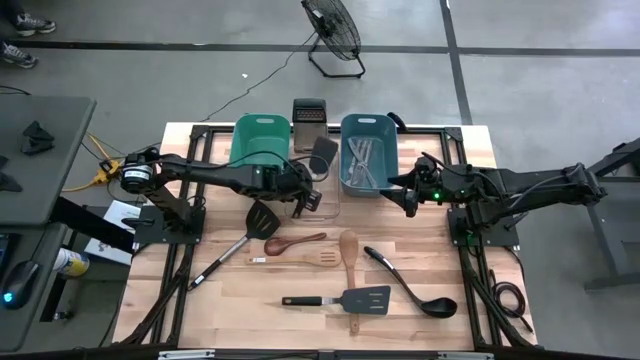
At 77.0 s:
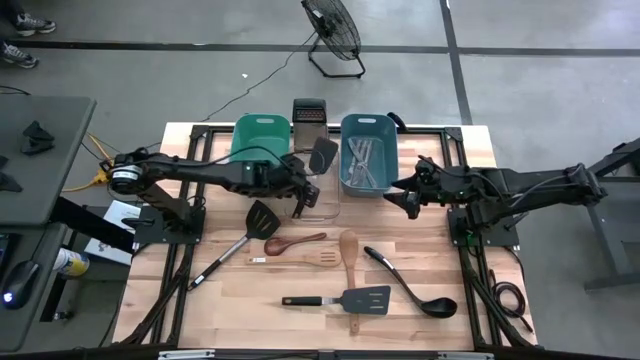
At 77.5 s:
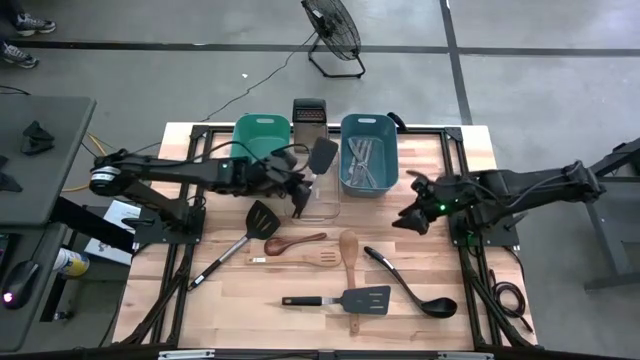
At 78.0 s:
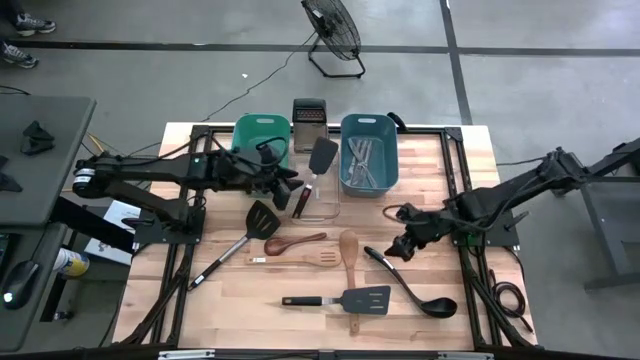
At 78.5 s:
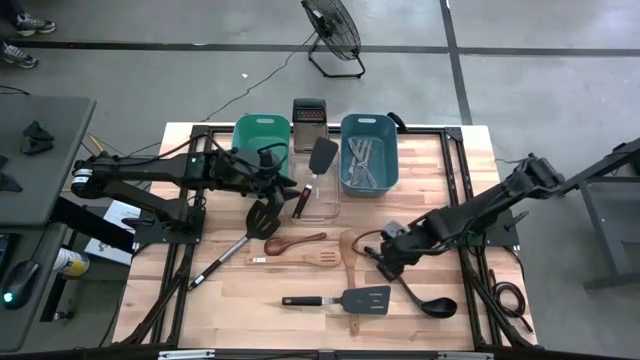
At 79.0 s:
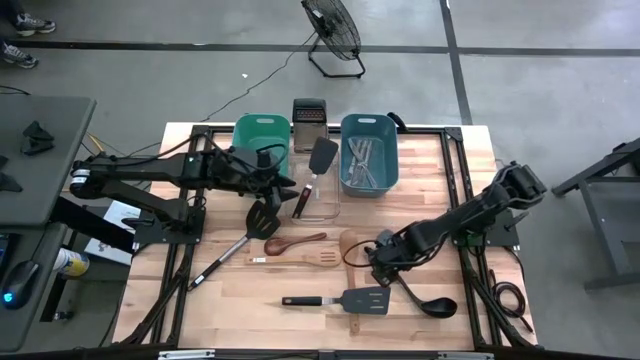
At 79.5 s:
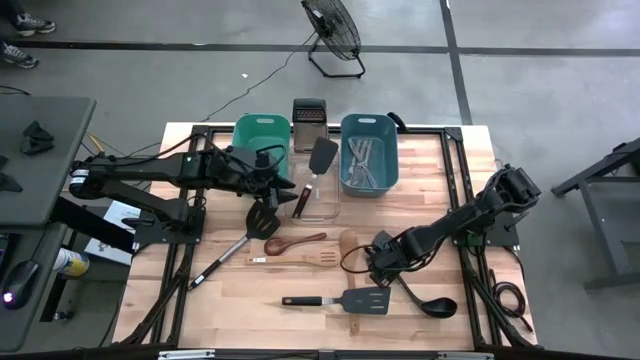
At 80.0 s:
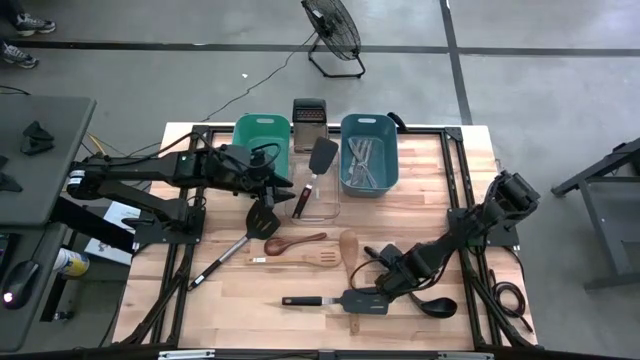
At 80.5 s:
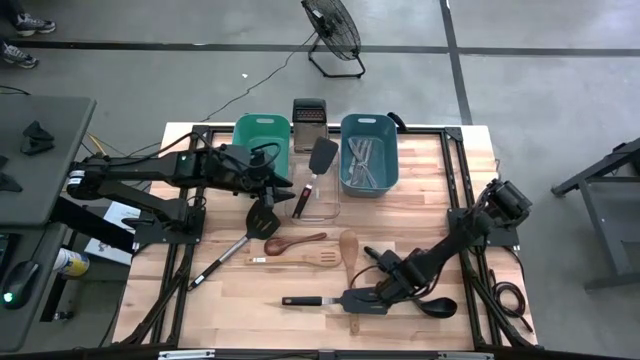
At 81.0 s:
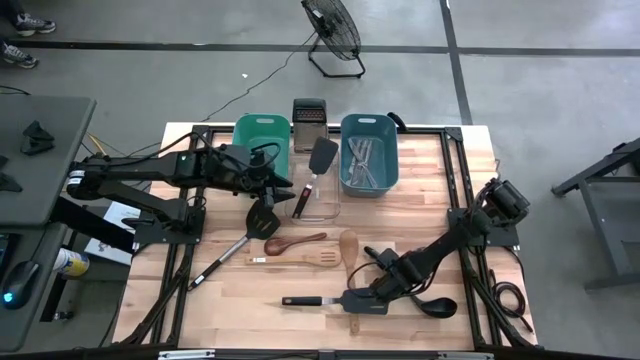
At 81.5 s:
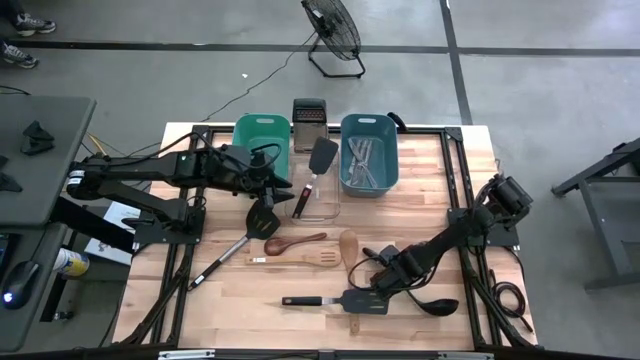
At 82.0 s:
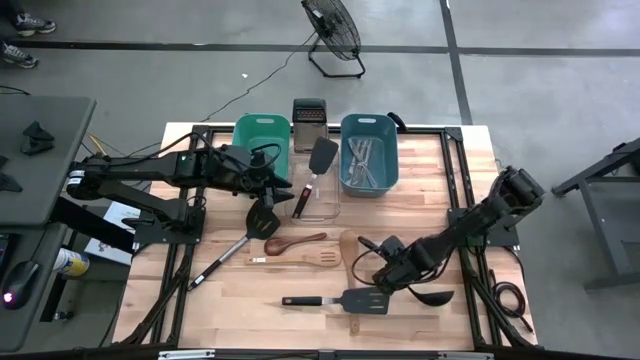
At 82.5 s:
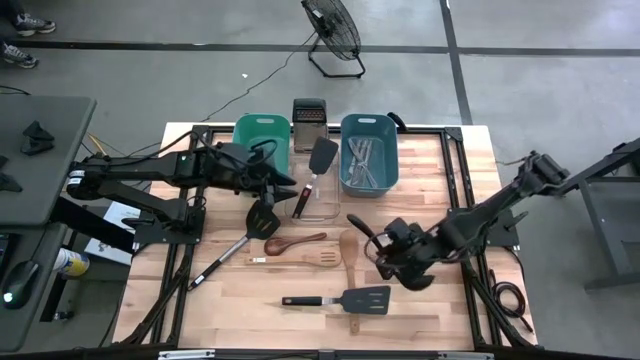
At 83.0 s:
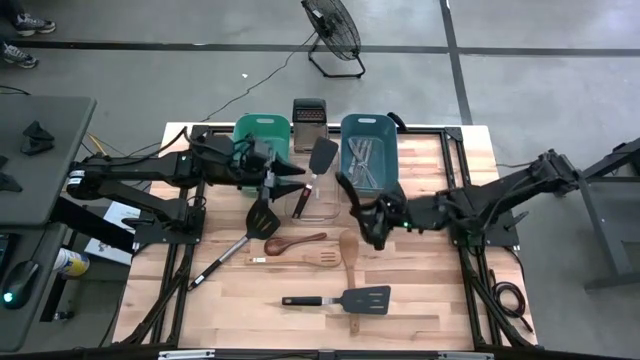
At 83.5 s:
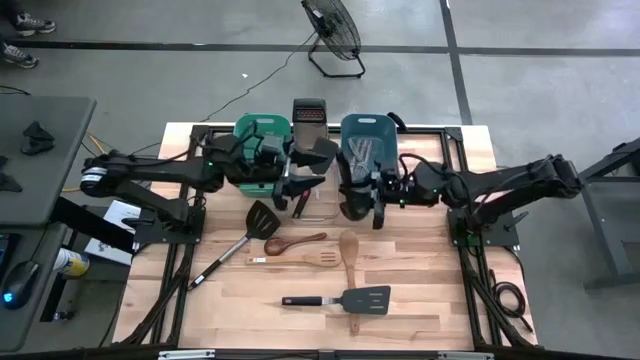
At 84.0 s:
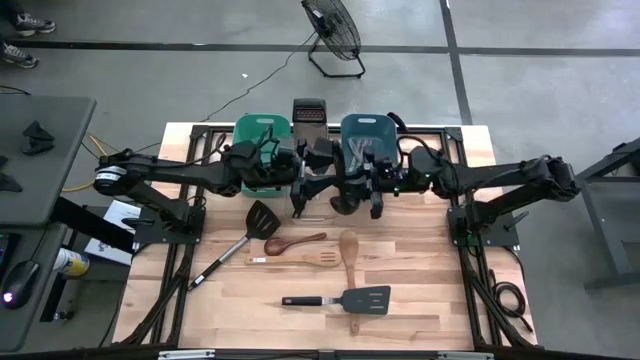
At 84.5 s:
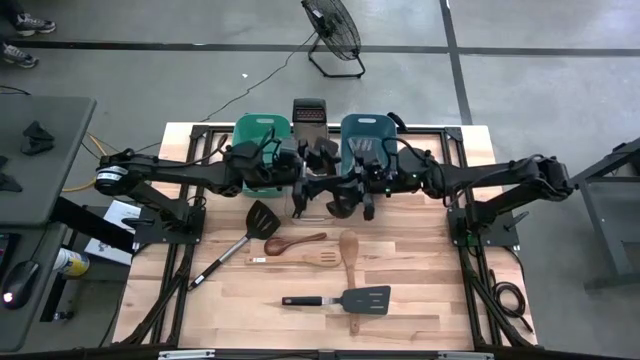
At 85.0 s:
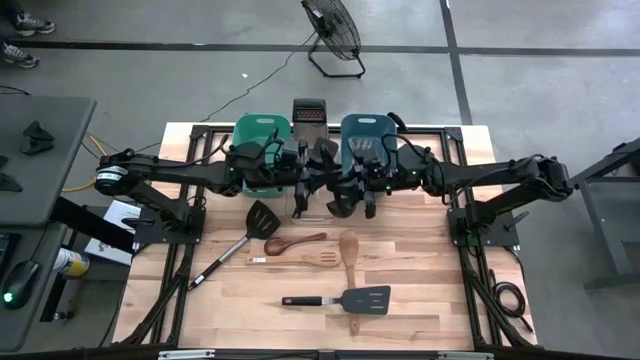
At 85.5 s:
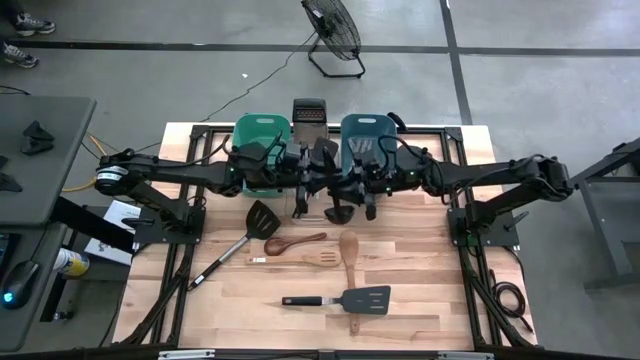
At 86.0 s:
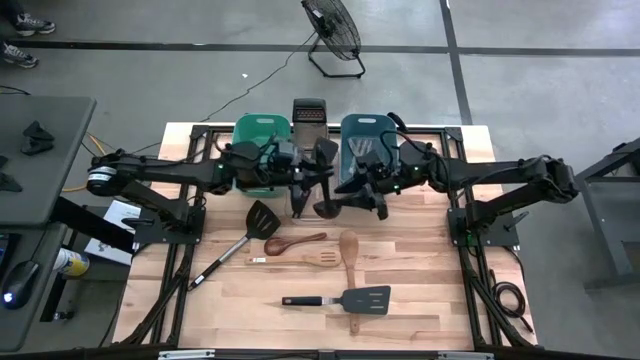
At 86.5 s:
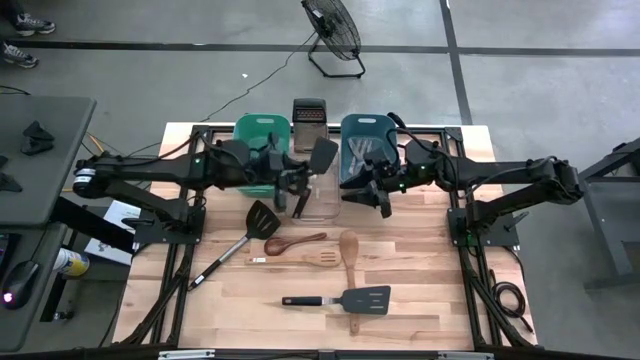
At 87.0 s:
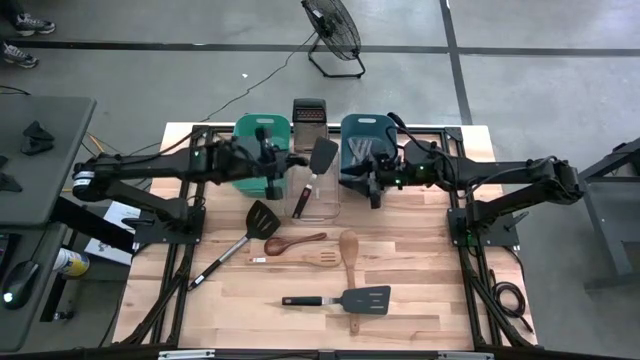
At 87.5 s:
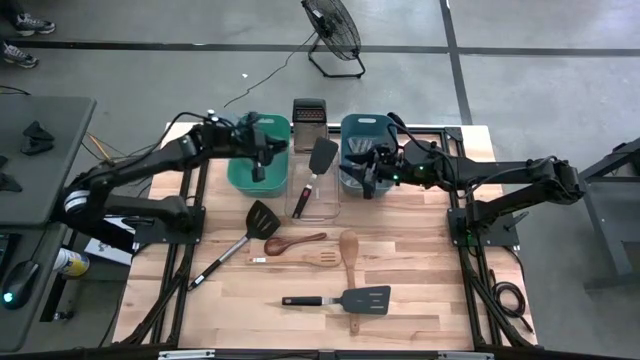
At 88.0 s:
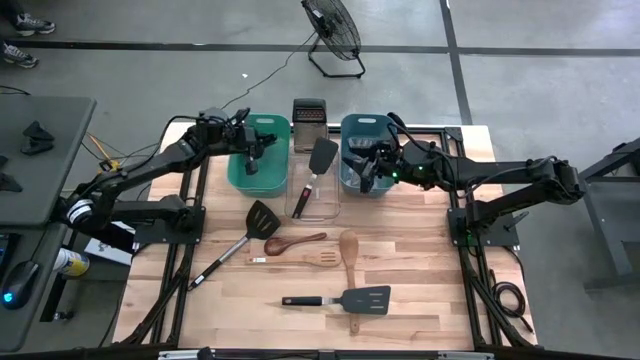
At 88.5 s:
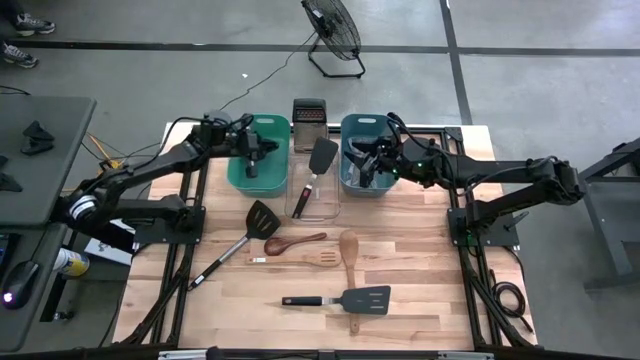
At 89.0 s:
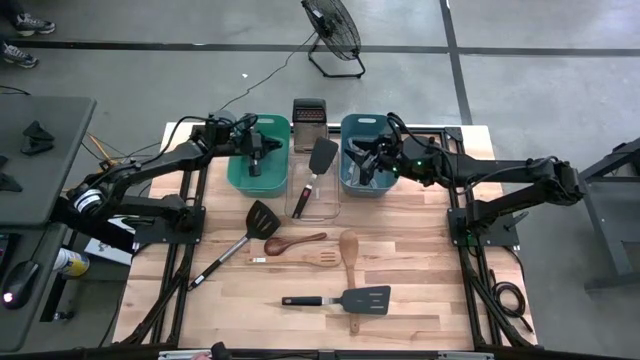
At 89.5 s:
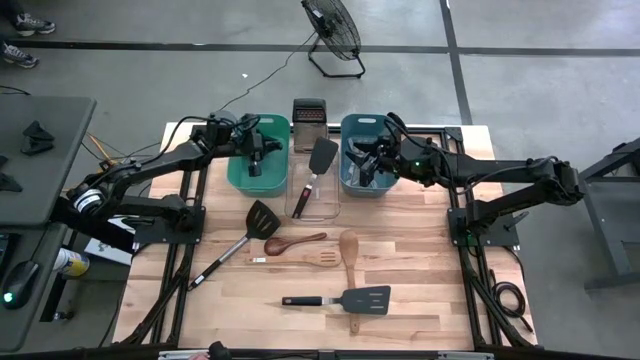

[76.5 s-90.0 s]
Task: Pick & Place Kitchen Items
Put the black serving spoon into the green bin

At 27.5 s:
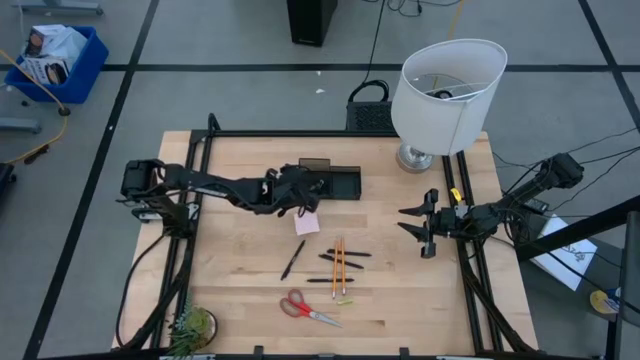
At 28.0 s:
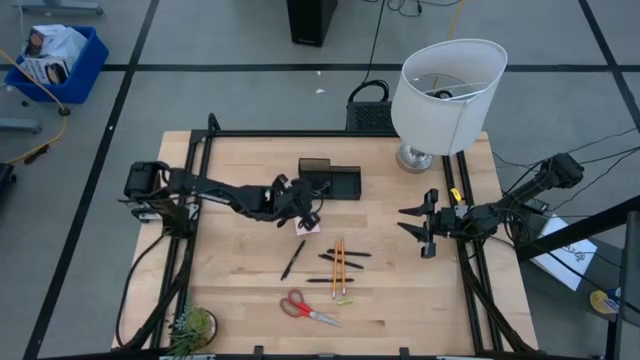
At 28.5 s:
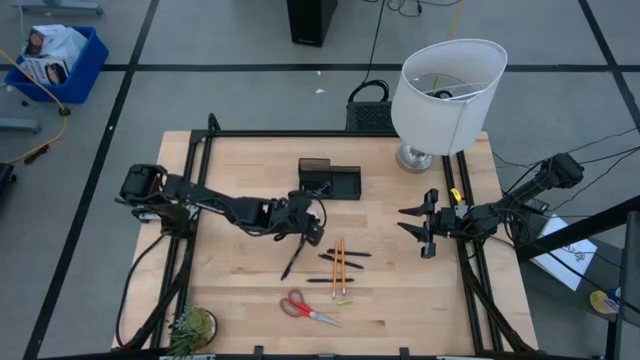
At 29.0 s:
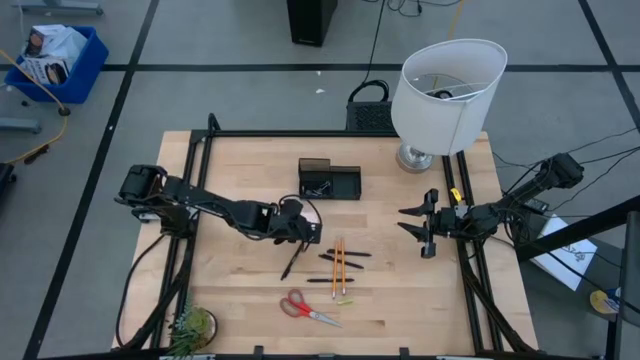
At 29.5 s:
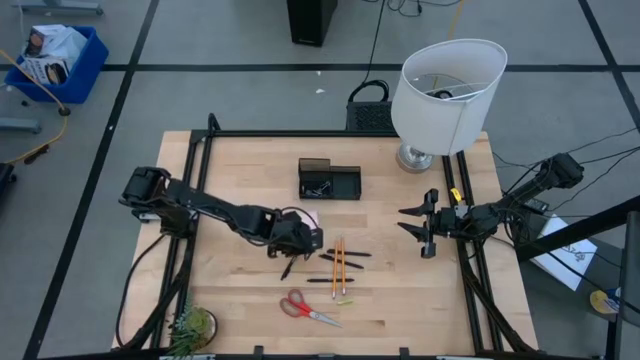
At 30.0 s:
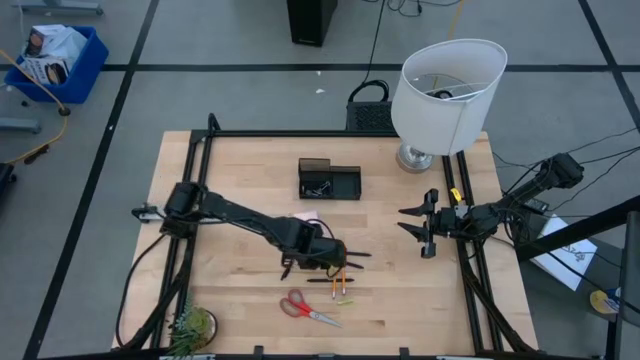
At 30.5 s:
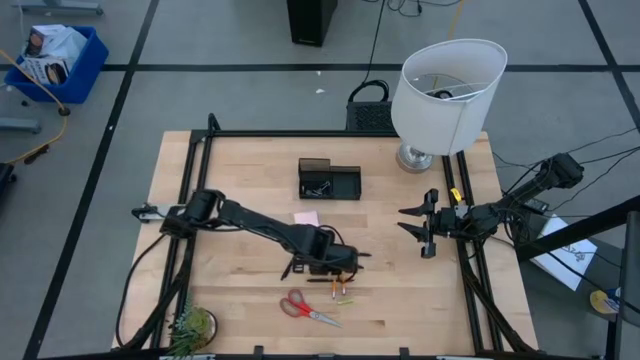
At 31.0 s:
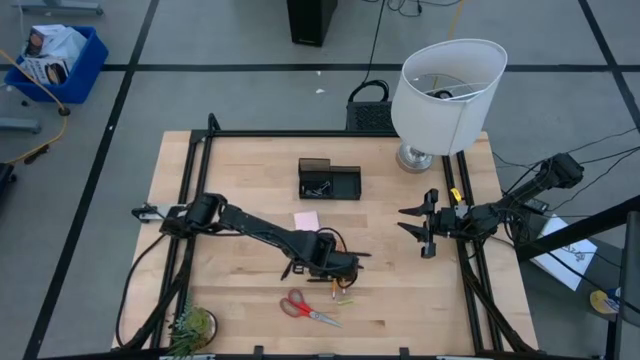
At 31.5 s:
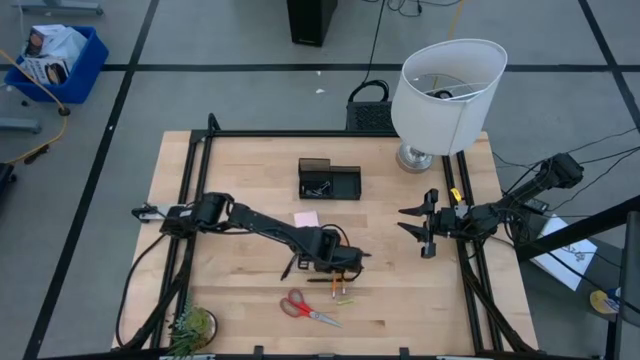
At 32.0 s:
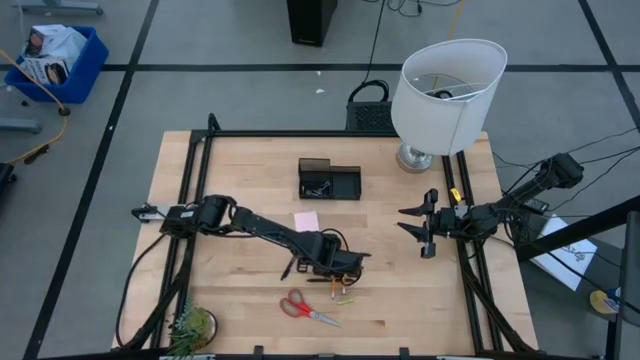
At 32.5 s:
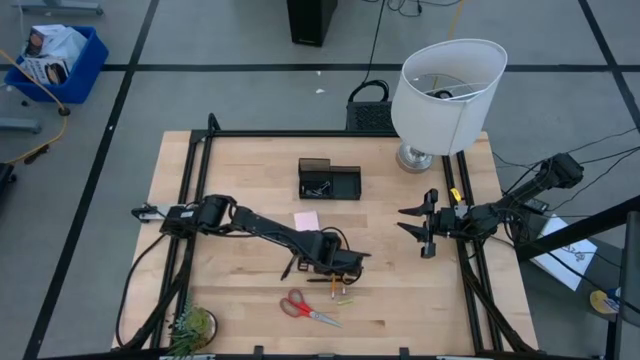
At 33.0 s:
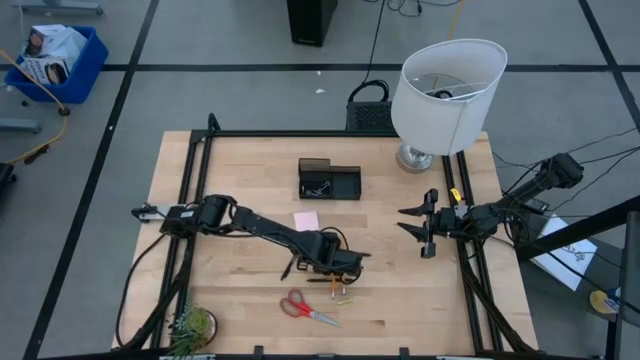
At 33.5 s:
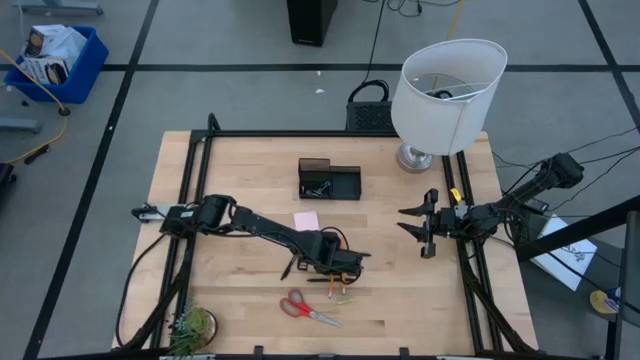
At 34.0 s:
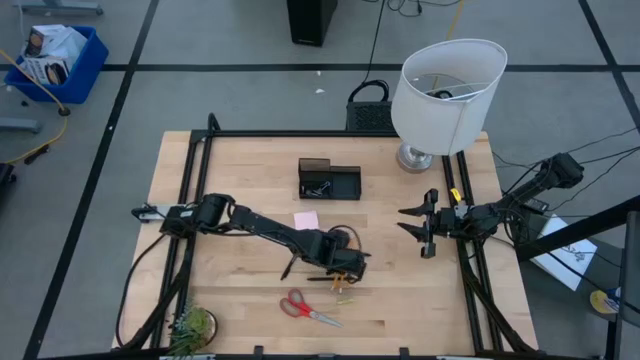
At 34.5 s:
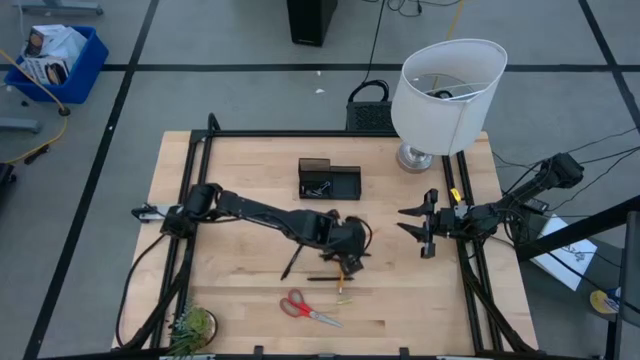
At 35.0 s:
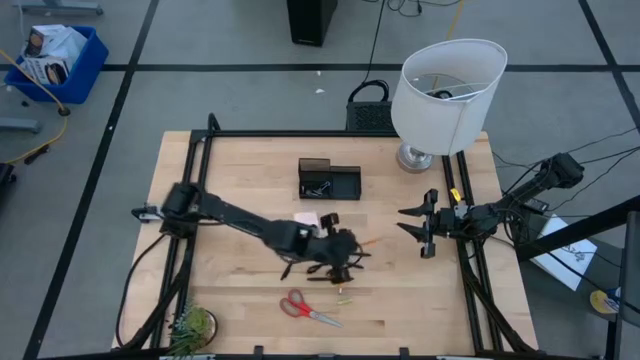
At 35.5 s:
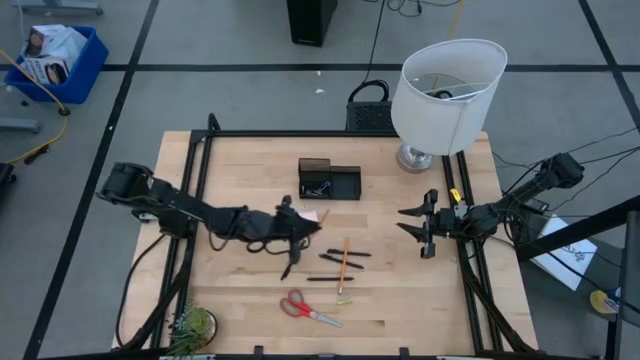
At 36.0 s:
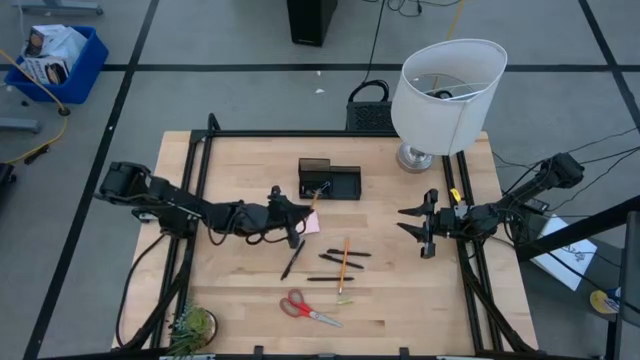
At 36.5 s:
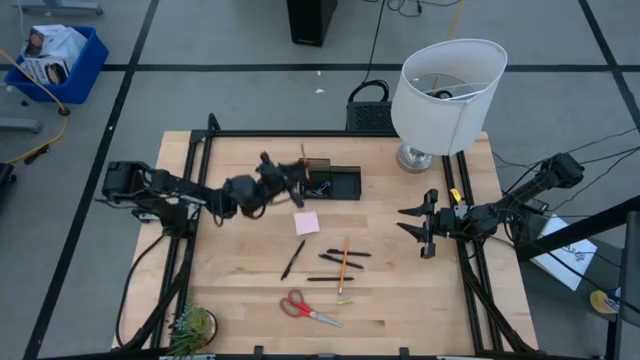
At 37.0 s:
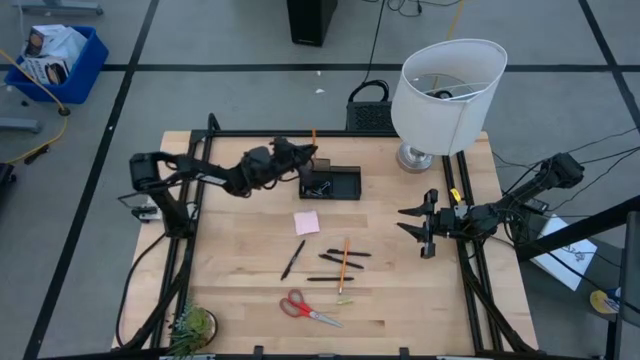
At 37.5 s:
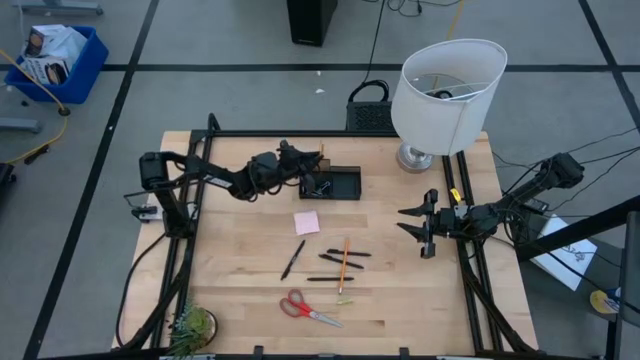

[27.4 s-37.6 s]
Task: Pick and place office supplies into organizer
Put the orange pencil into the desk organizer
